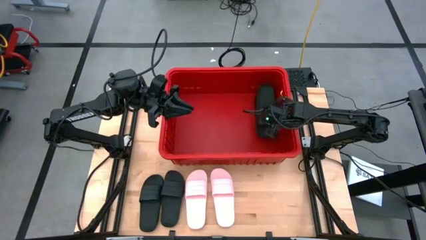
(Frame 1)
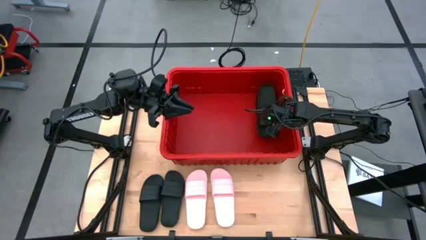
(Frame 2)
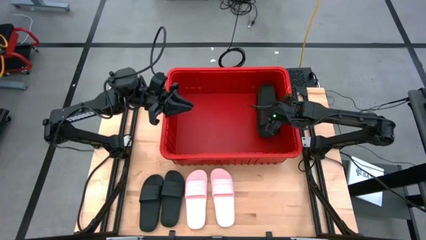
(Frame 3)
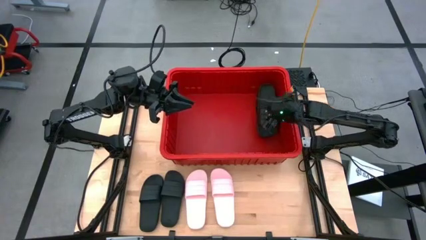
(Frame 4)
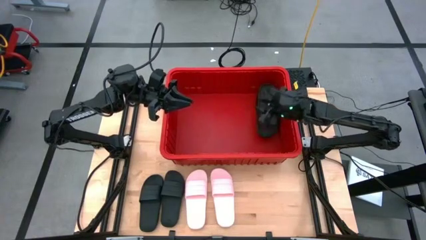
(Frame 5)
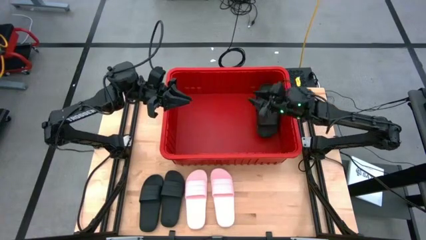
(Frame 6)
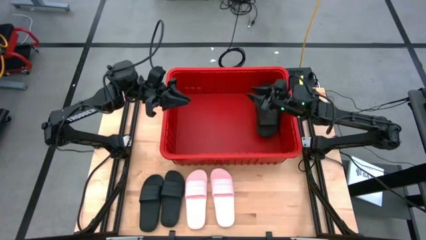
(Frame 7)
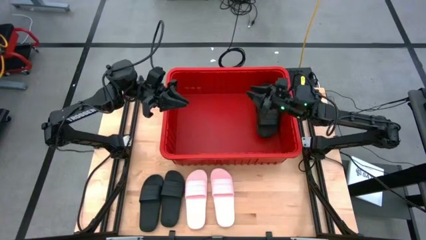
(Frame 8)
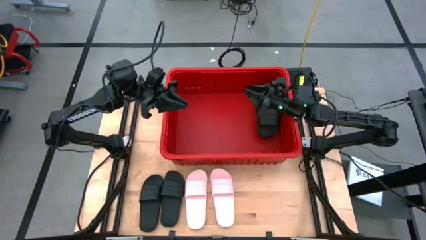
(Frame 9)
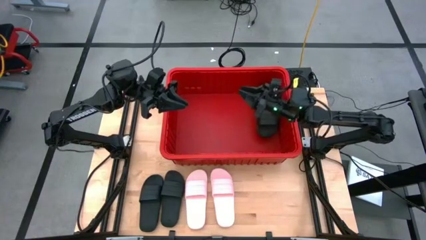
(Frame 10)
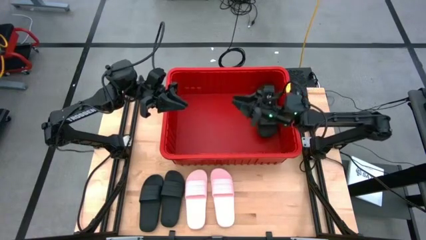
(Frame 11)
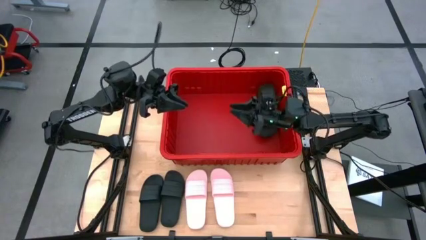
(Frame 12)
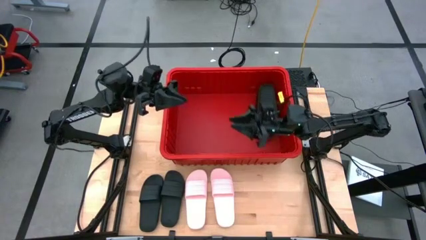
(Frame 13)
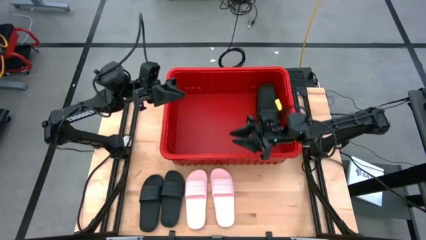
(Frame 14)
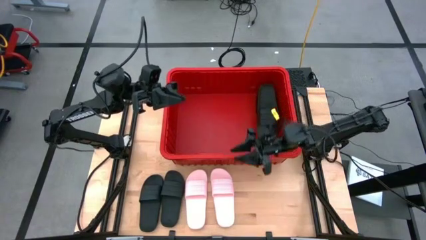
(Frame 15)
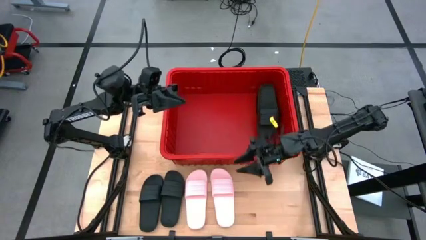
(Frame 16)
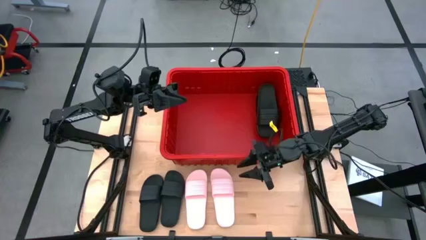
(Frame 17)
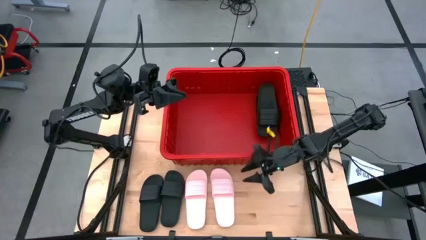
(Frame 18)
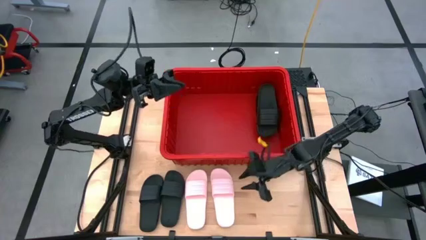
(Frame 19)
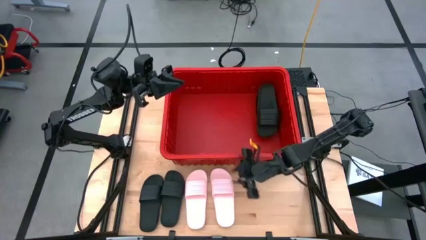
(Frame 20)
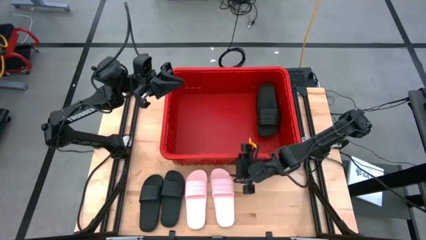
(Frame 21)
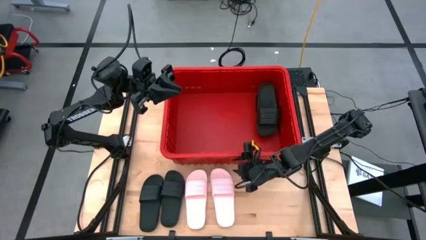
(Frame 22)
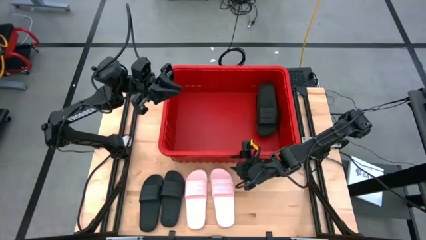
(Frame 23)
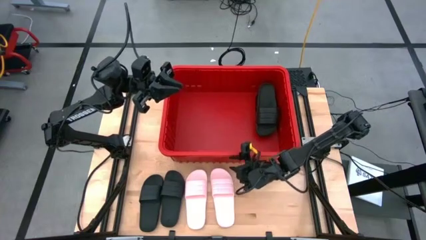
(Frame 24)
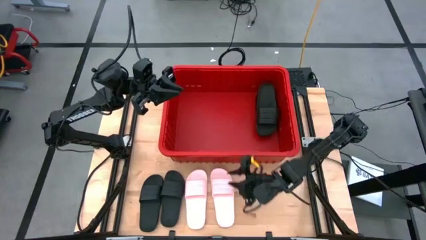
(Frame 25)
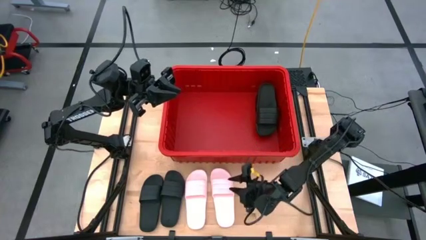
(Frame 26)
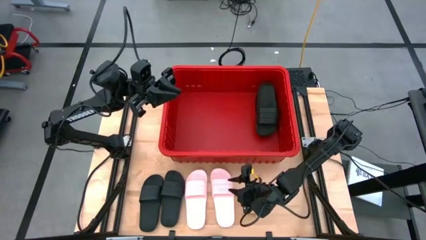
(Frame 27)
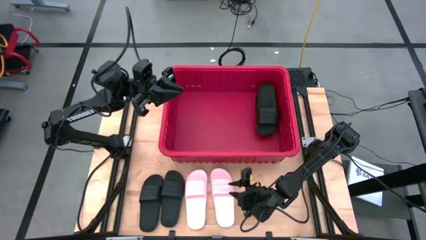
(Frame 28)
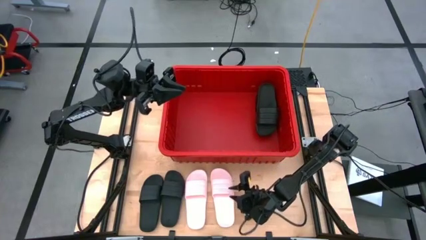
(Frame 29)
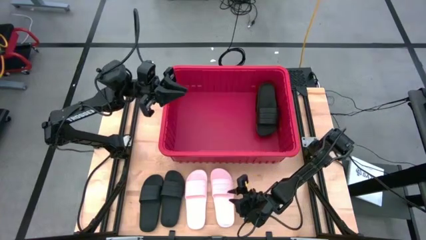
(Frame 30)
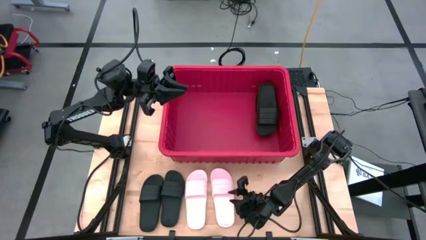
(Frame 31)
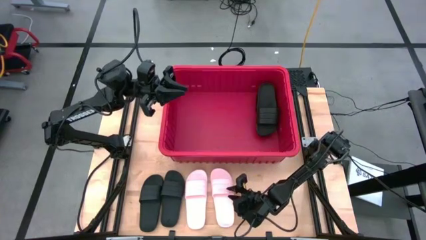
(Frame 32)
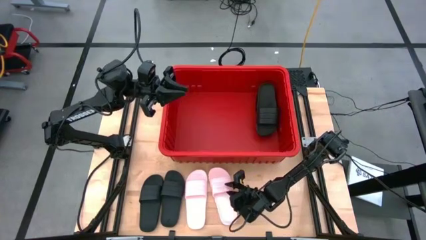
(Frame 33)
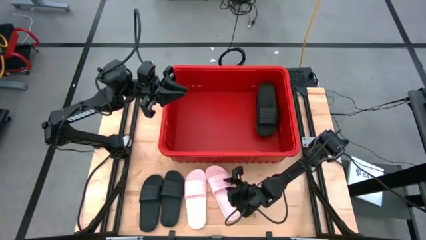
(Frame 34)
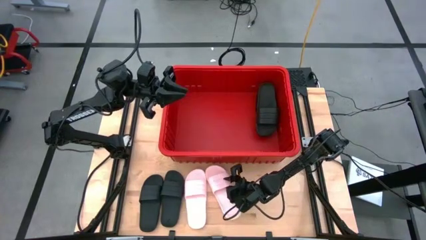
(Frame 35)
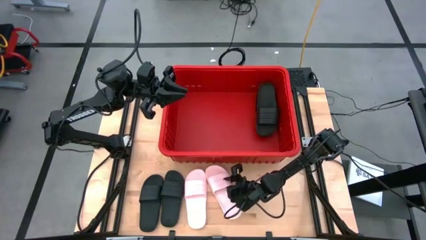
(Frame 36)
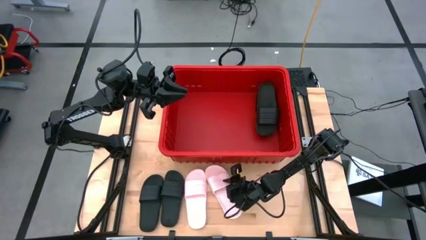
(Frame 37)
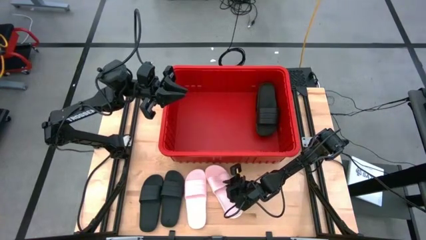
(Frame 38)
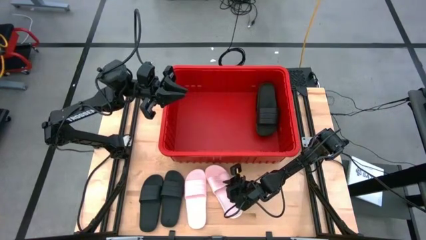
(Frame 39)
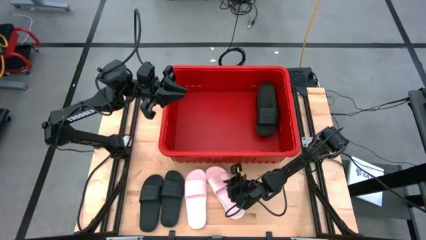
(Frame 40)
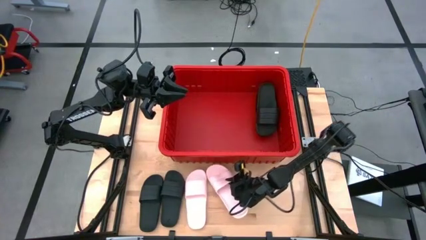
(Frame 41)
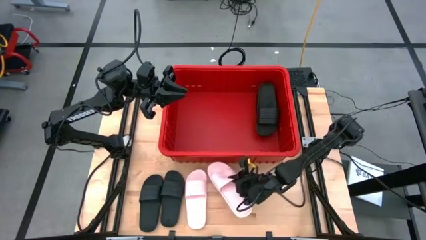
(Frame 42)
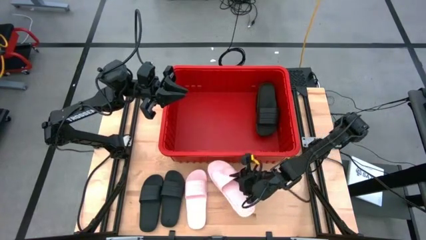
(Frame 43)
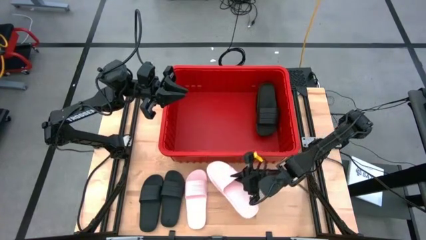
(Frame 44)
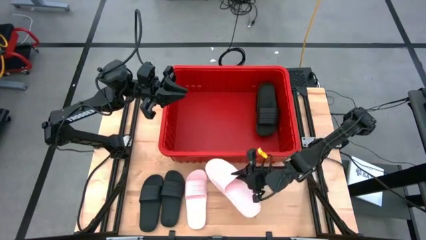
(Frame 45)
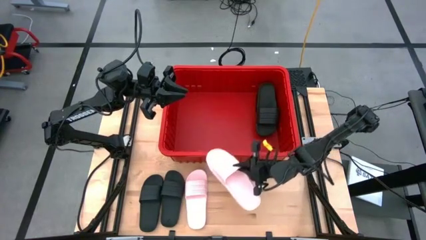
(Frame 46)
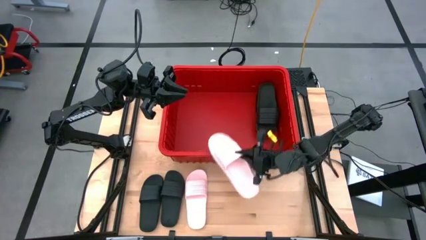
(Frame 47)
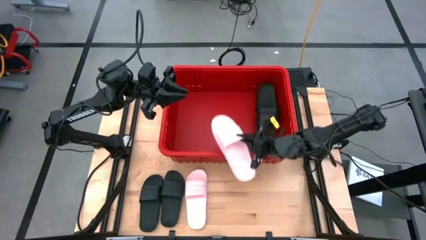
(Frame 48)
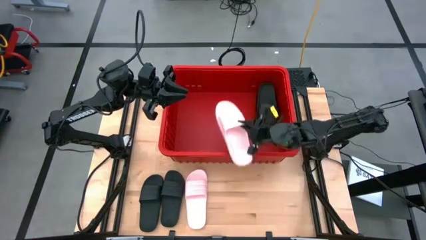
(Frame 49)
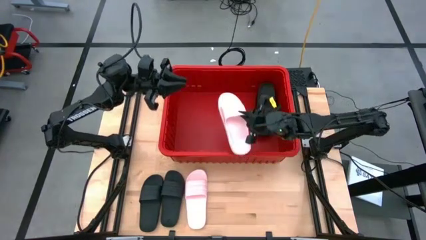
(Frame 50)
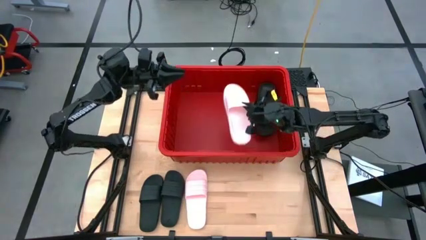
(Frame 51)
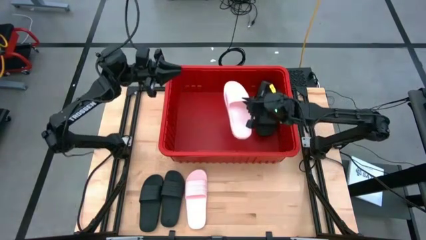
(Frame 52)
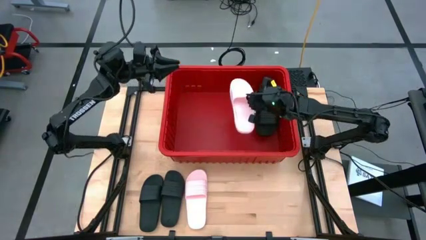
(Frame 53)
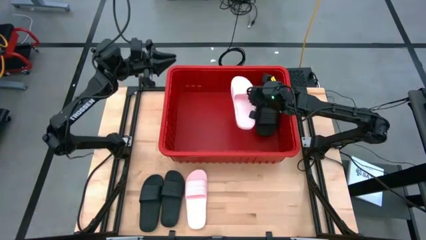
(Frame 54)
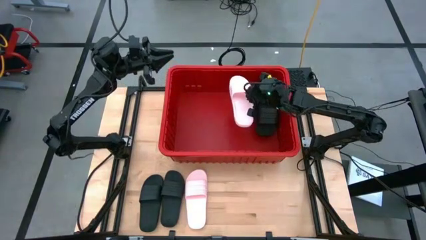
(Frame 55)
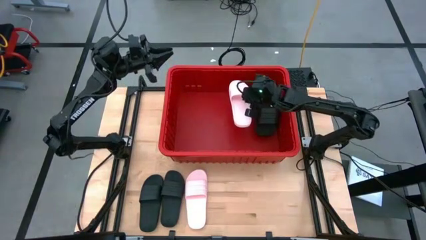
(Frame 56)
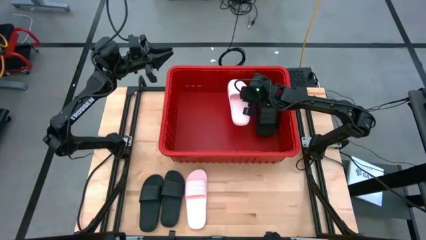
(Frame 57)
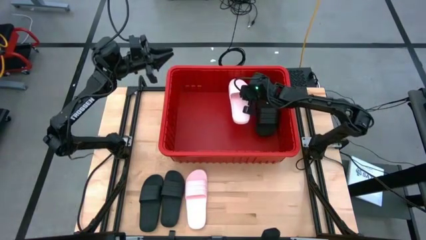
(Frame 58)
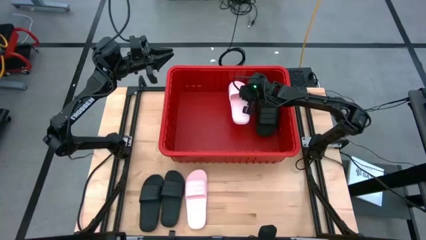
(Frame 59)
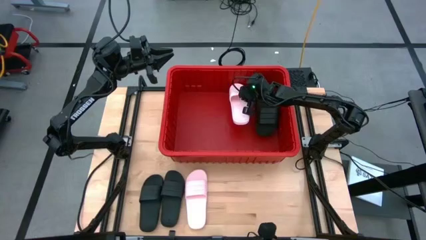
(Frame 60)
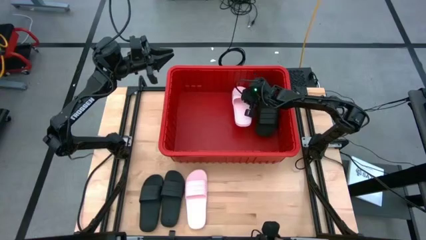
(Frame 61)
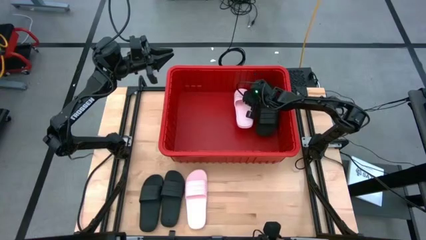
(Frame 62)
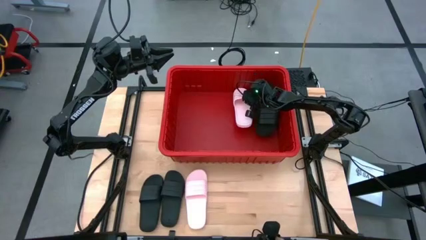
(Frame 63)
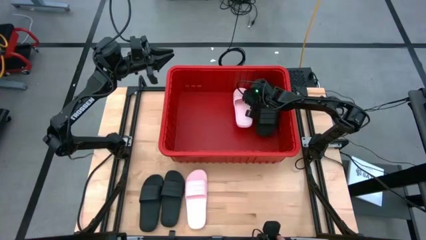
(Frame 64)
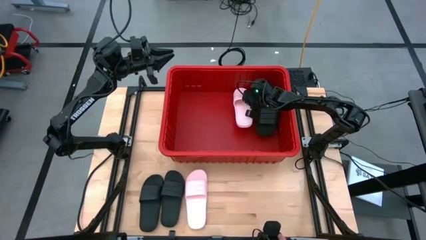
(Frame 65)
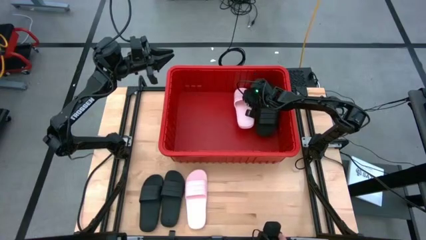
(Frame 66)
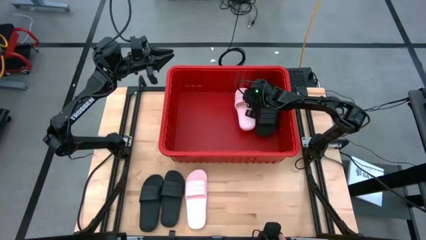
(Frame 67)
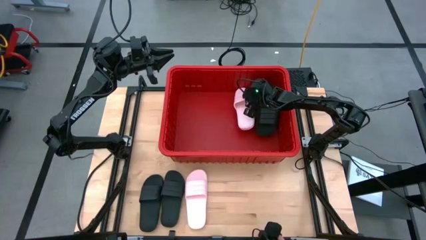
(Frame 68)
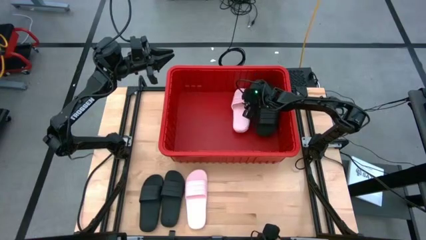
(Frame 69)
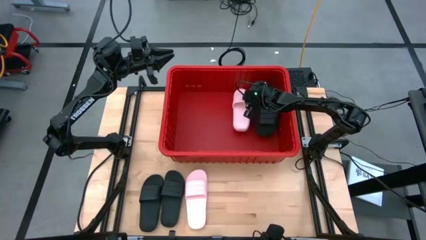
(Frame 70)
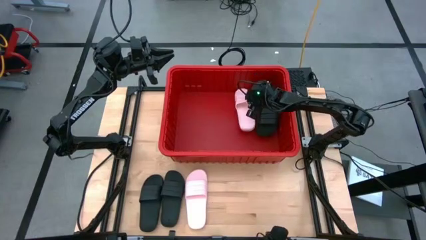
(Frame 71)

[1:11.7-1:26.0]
Task: Pick and place slides into bin
Put the pink slide into the red organizer bin
